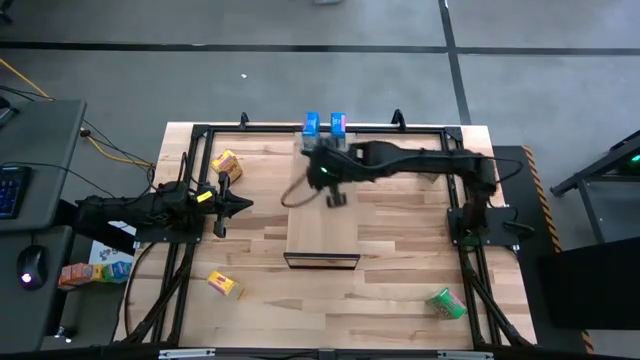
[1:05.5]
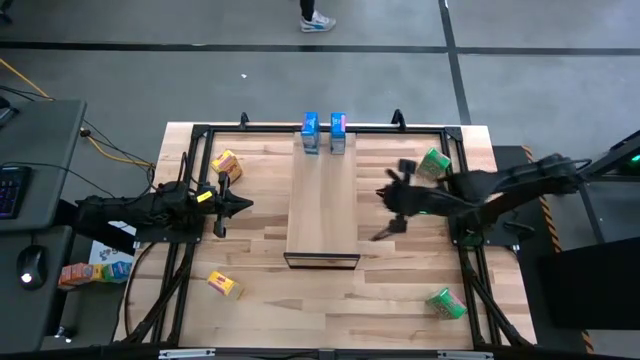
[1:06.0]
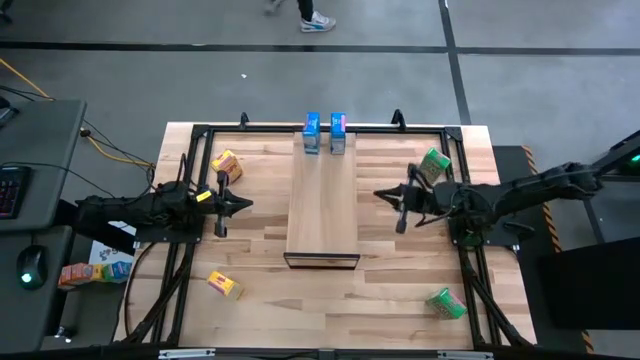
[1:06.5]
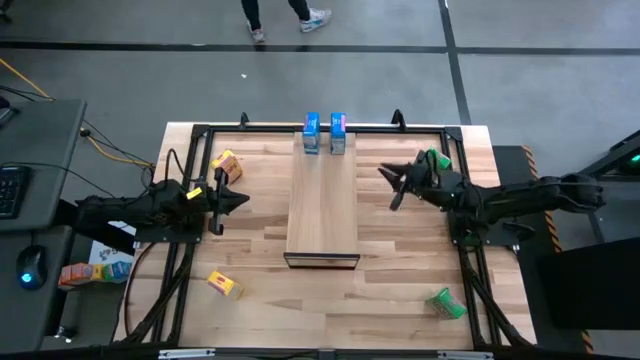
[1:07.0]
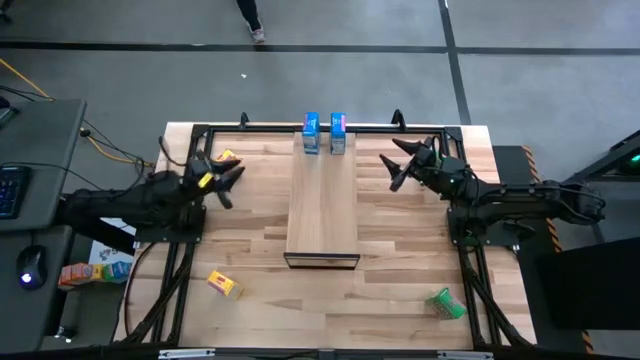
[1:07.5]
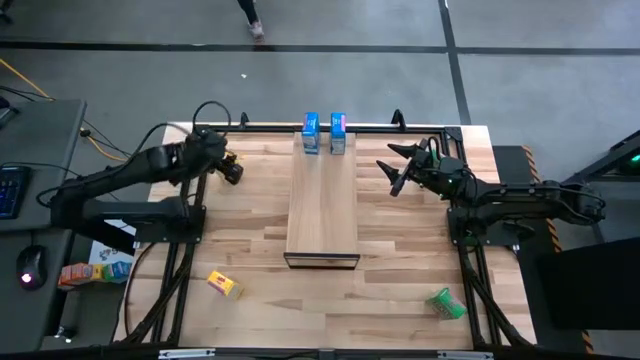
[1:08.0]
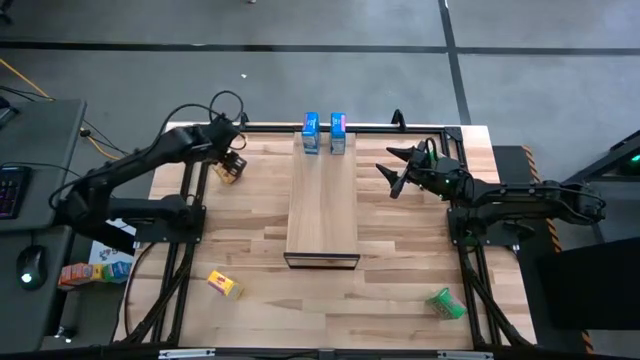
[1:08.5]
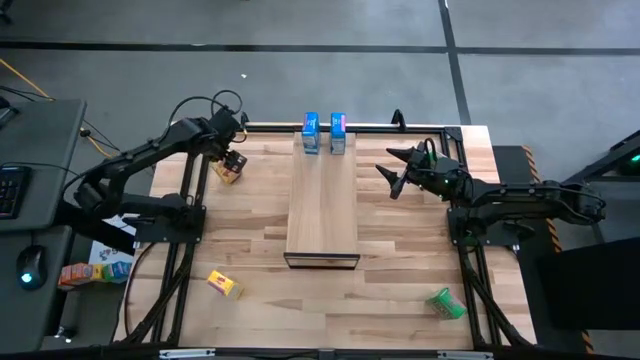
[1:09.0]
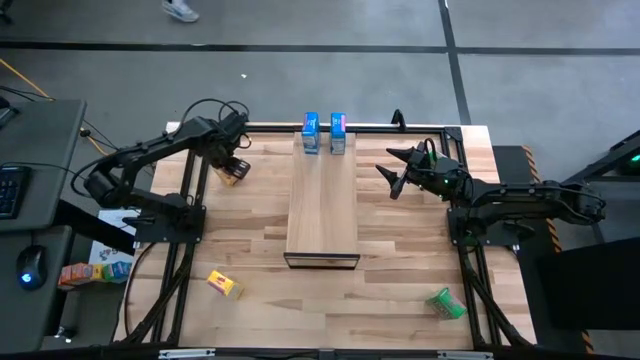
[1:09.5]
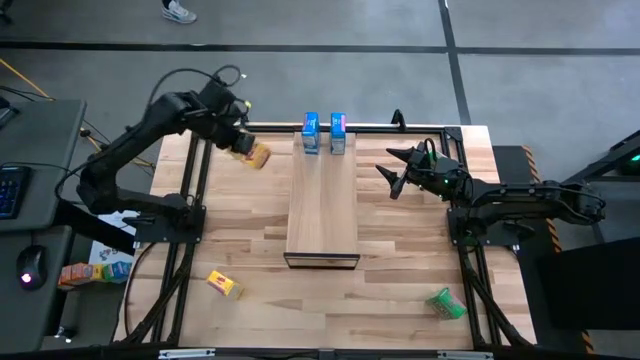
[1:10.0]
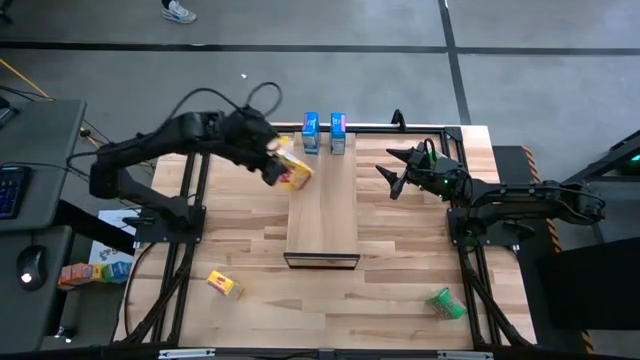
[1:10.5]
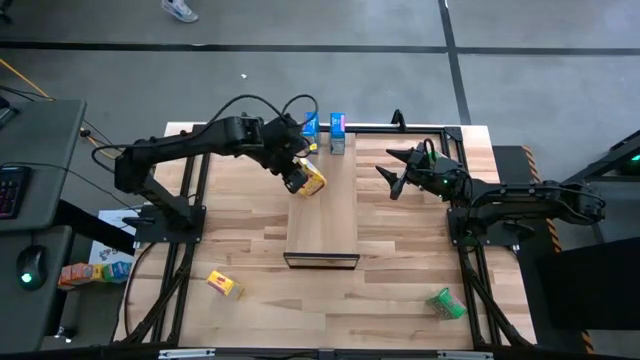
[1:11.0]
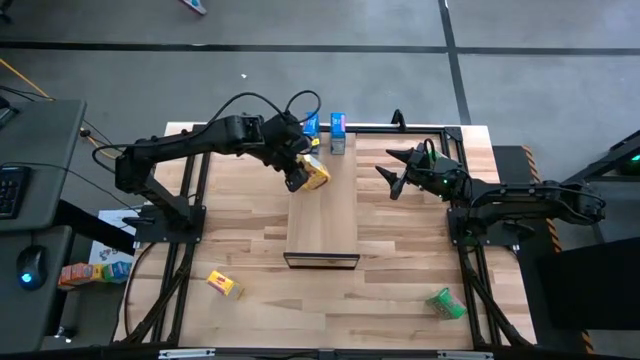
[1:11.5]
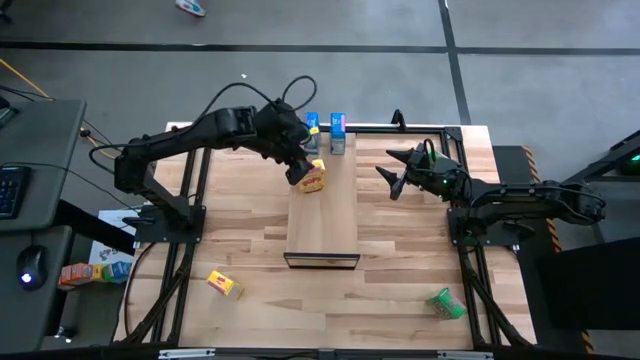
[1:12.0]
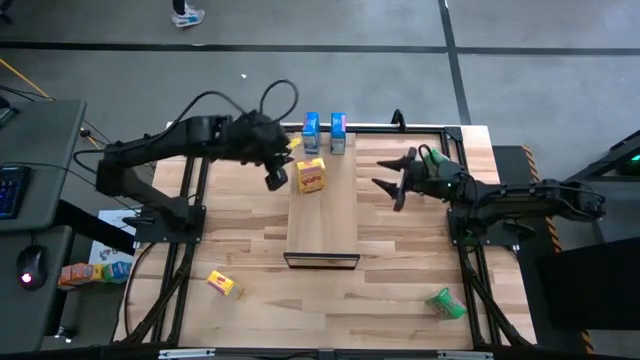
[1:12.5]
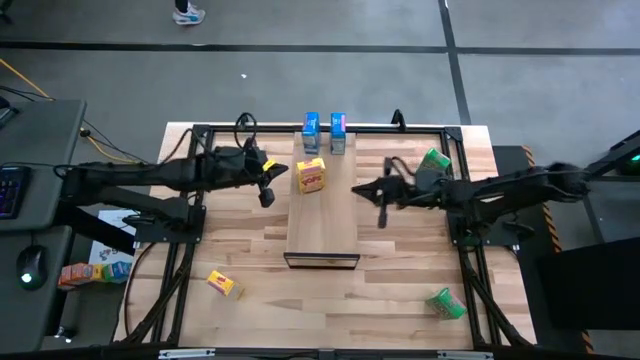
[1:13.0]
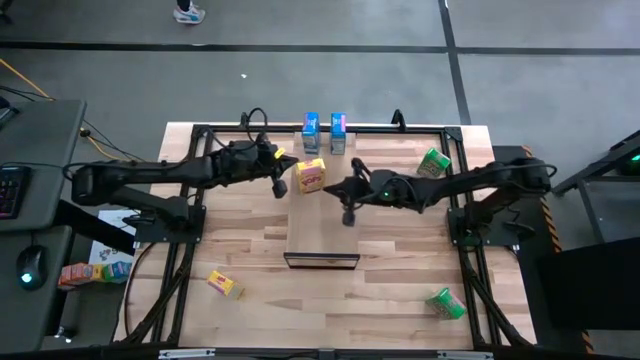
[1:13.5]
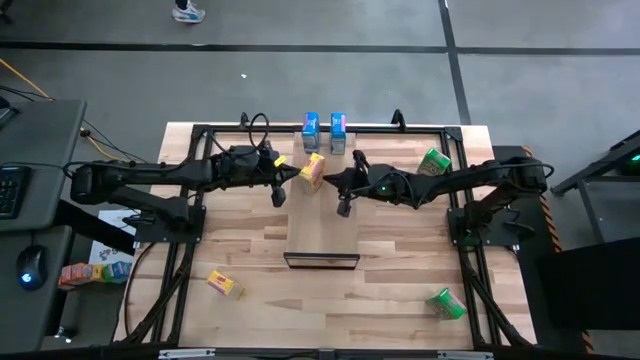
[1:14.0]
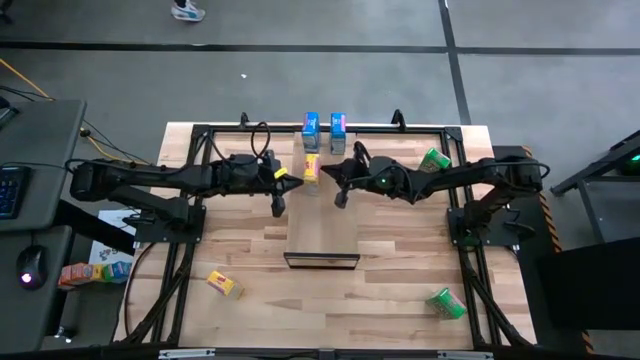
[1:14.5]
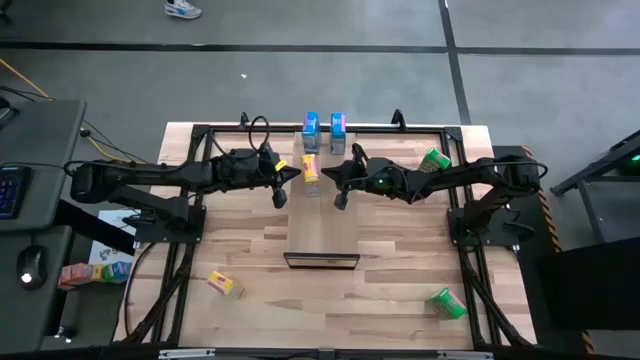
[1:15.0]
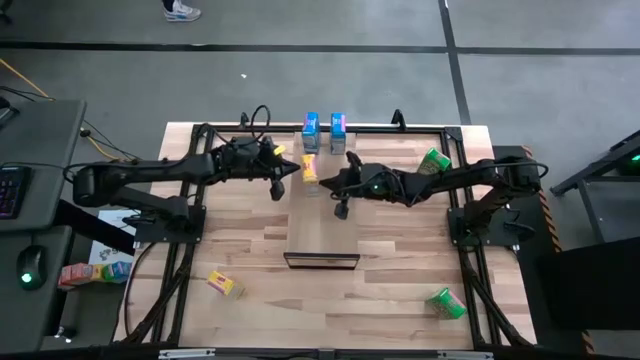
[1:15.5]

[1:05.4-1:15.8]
Task: Stack cereal on shelf
Put the top yellow cereal box on the shelf

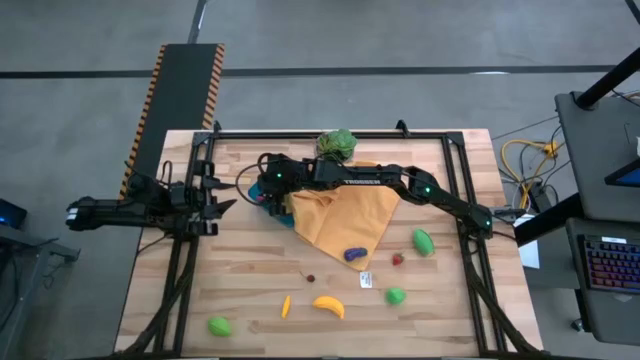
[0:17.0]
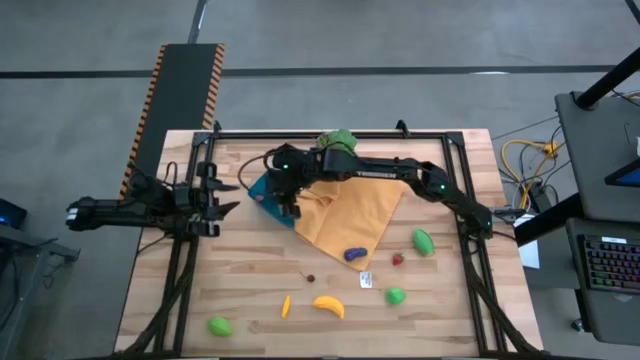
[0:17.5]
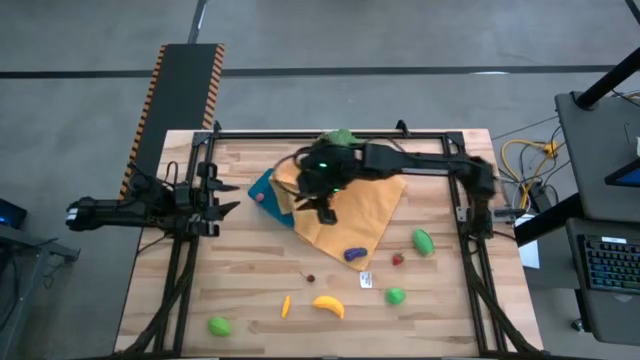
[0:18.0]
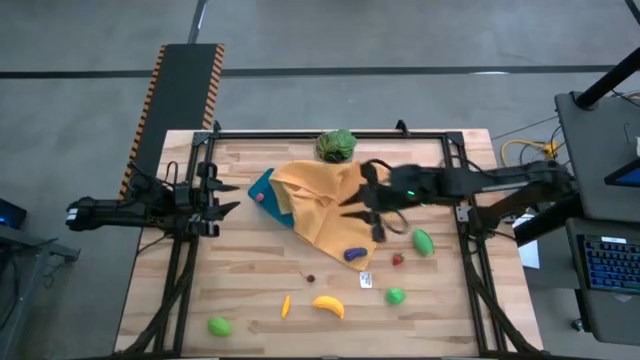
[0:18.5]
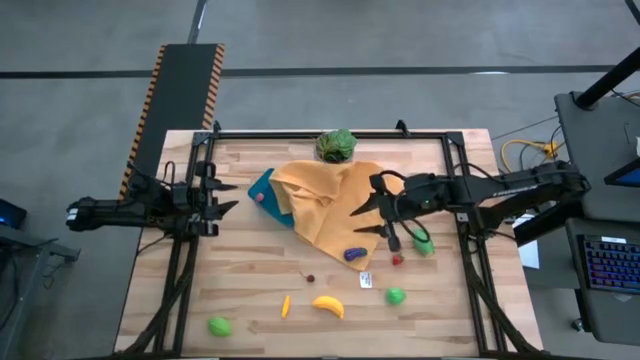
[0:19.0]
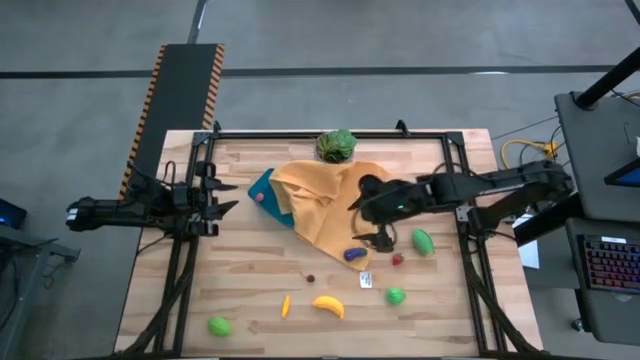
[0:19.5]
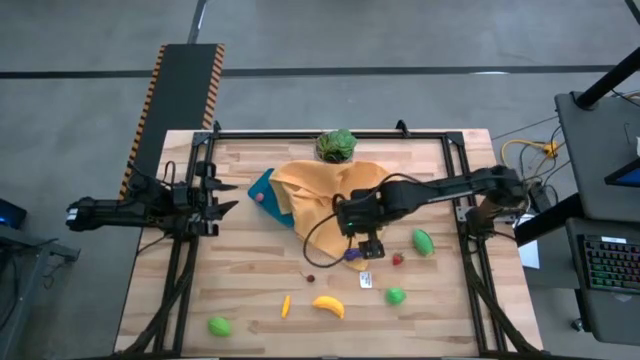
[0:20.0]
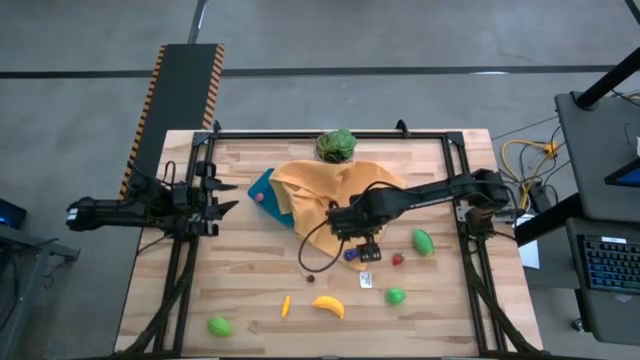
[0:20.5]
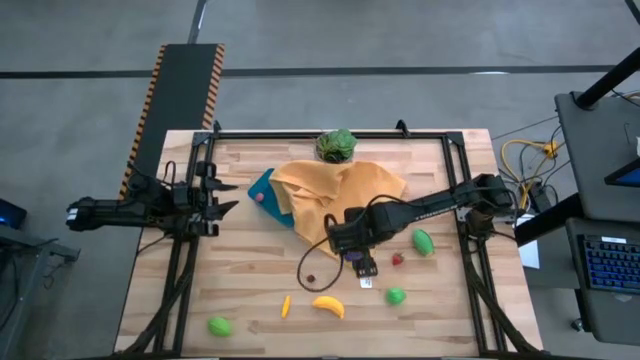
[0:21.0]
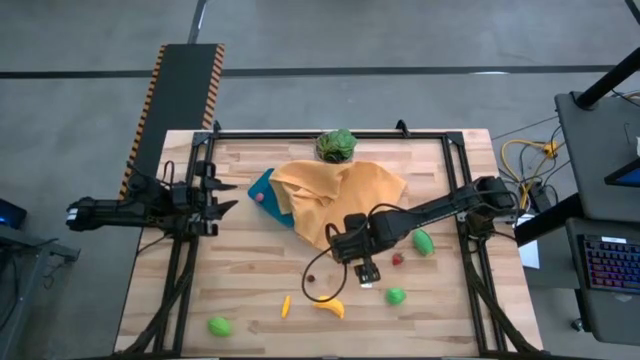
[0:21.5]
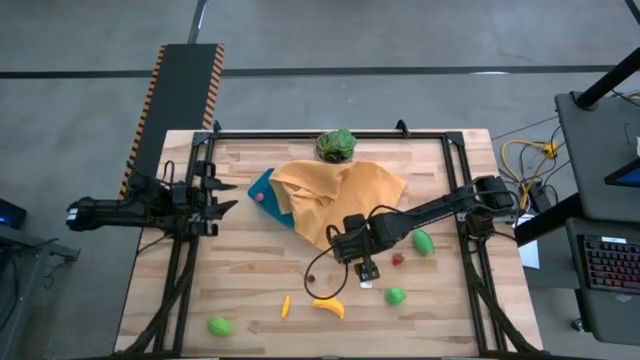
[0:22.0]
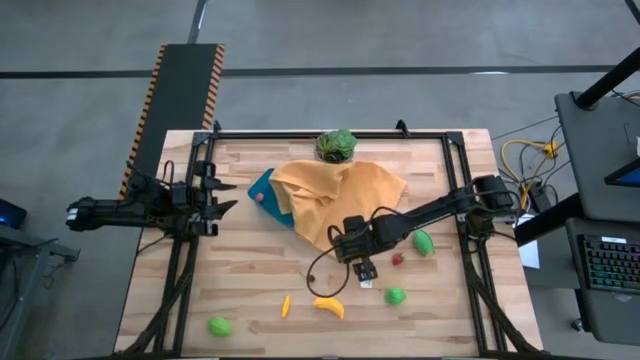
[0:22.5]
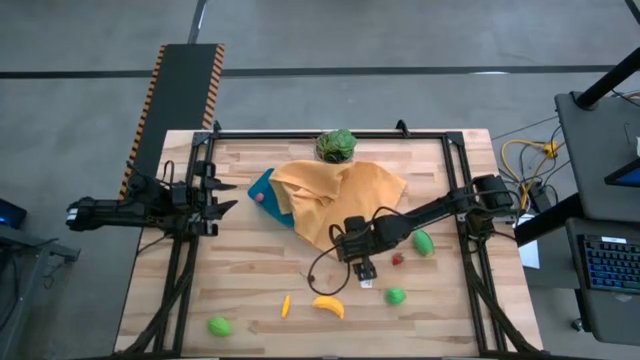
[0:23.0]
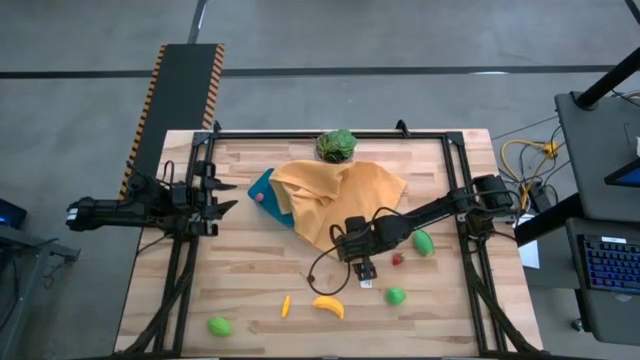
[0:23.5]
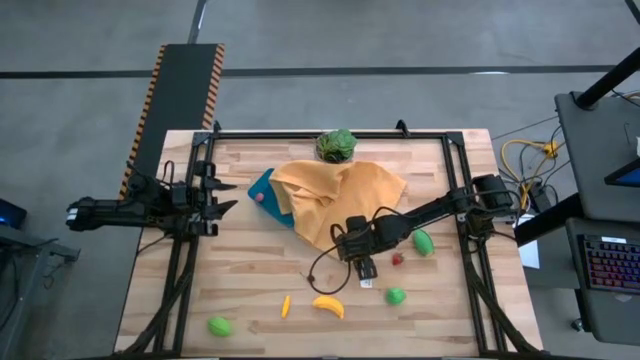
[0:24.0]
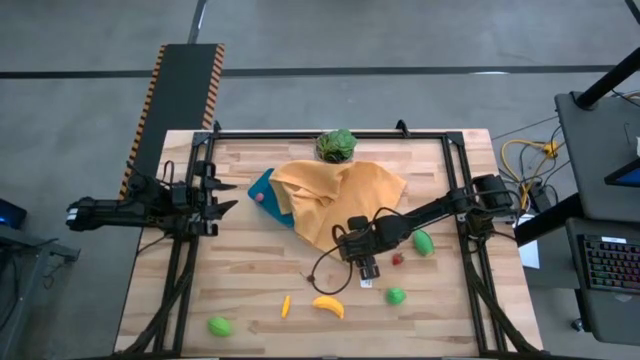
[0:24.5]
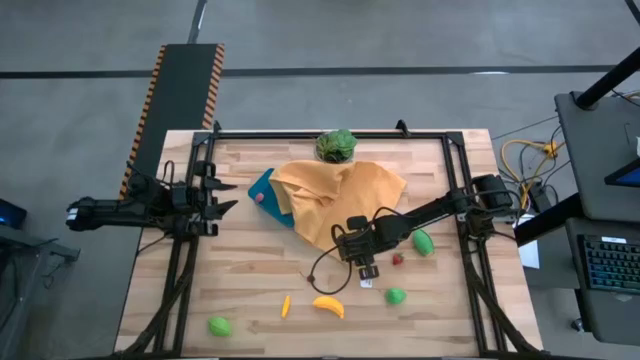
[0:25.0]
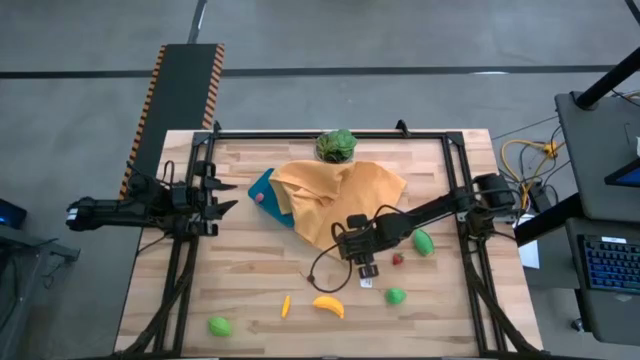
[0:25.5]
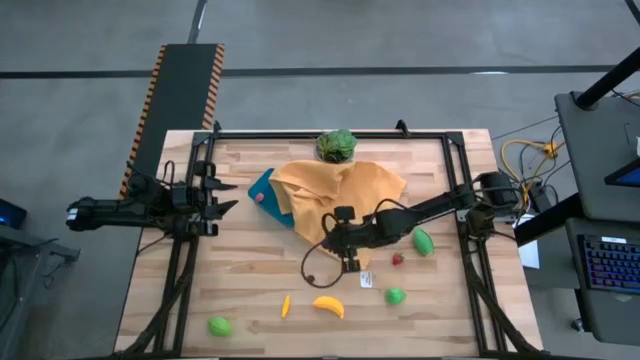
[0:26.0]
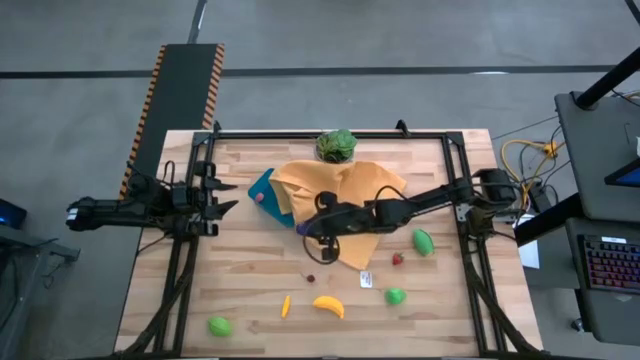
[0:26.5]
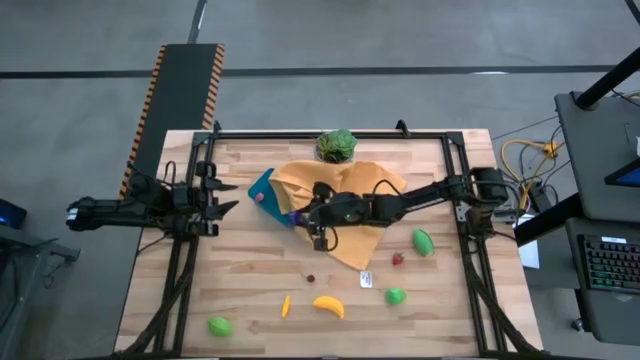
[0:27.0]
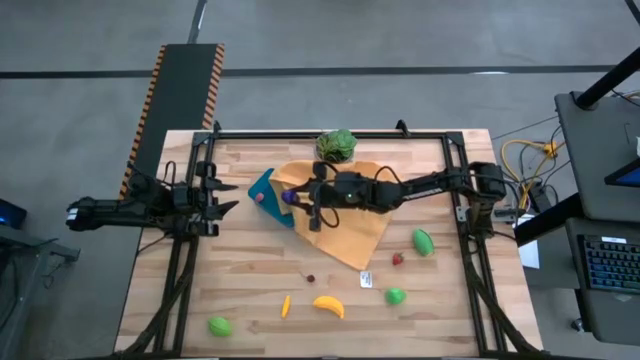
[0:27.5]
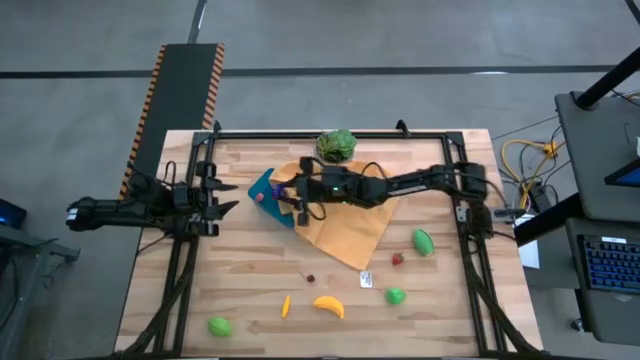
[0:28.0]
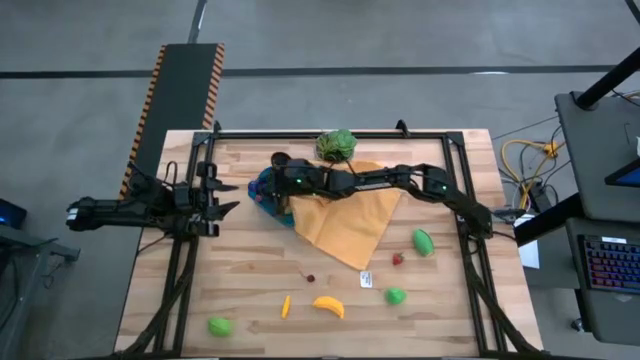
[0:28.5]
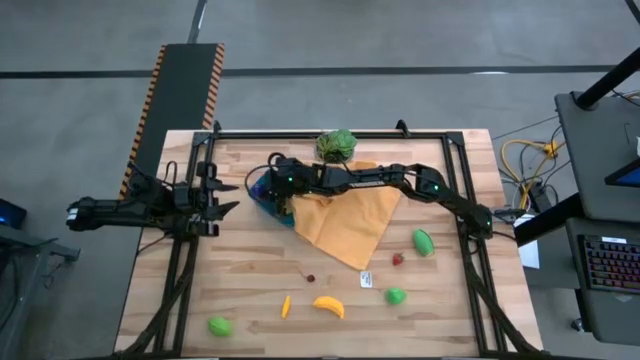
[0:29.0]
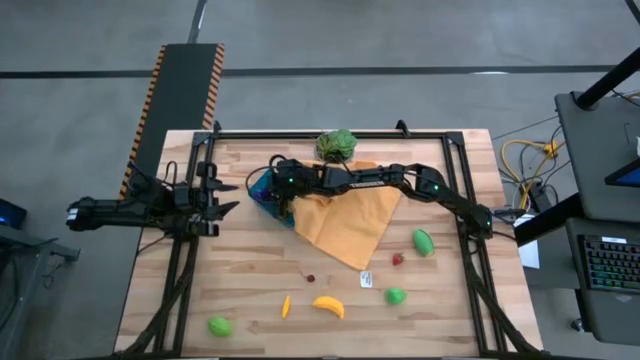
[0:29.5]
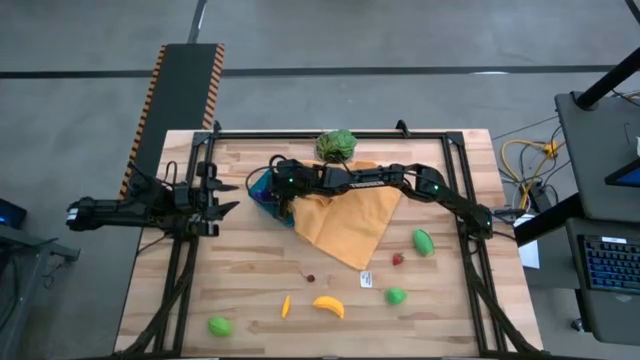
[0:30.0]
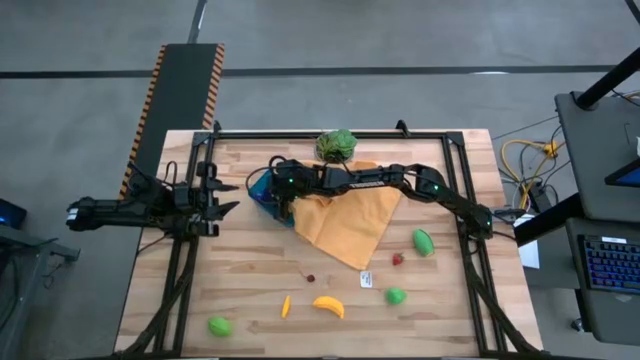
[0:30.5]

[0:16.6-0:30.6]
Task: Pick and placing Produce into tupperware
Put the violet eggplant into the blue bin
